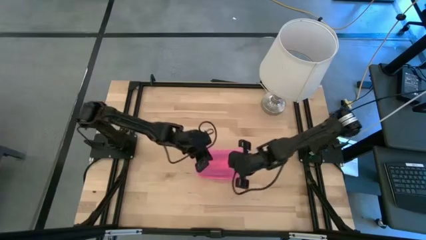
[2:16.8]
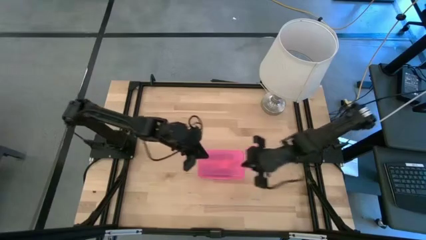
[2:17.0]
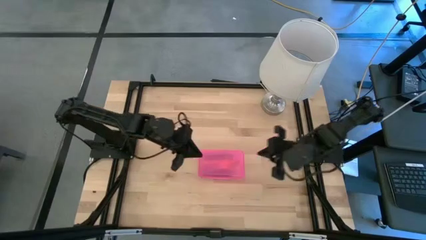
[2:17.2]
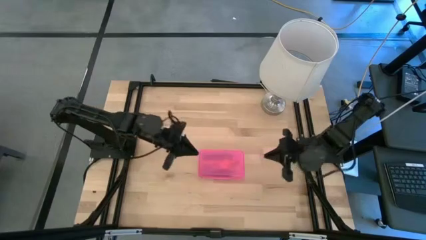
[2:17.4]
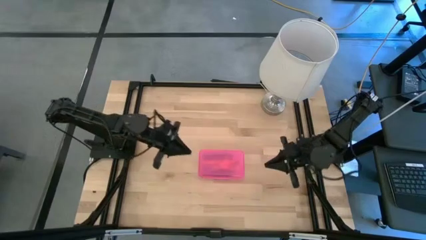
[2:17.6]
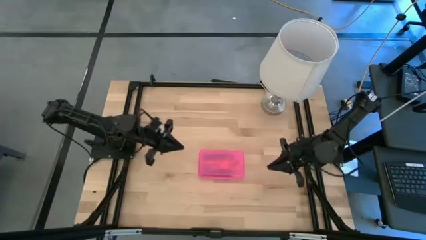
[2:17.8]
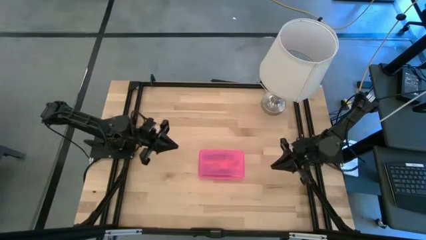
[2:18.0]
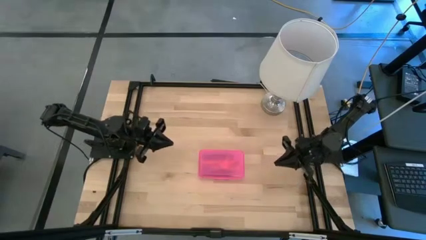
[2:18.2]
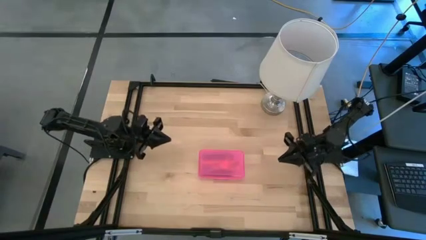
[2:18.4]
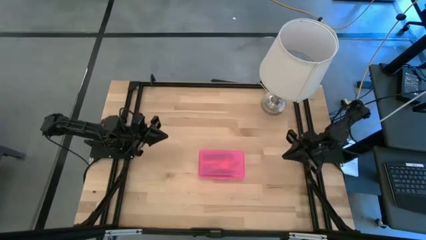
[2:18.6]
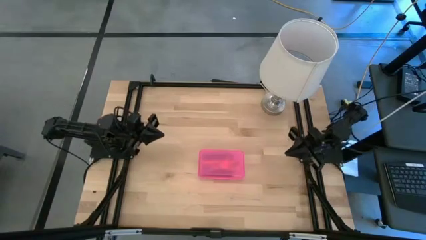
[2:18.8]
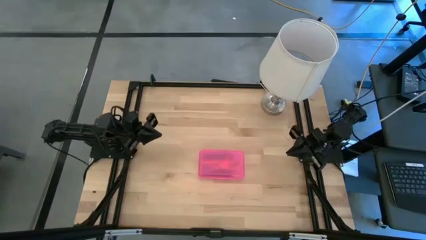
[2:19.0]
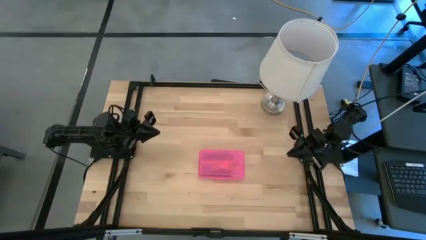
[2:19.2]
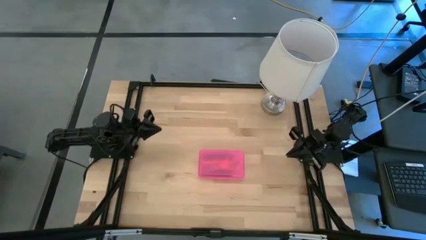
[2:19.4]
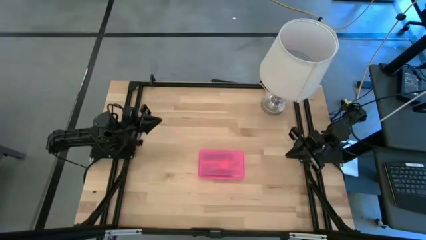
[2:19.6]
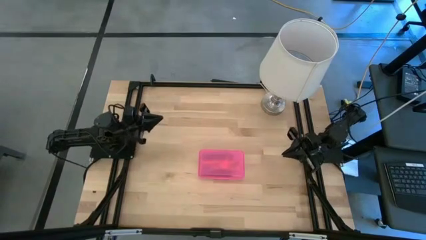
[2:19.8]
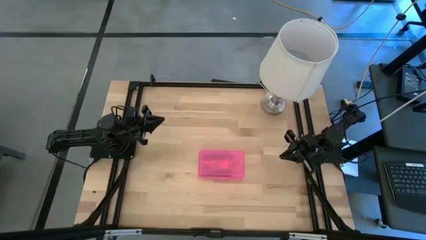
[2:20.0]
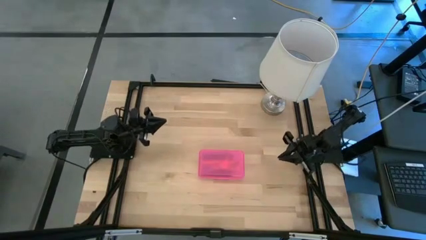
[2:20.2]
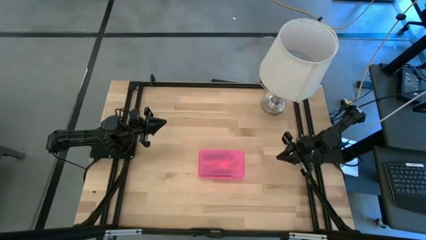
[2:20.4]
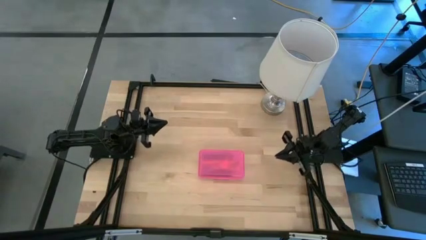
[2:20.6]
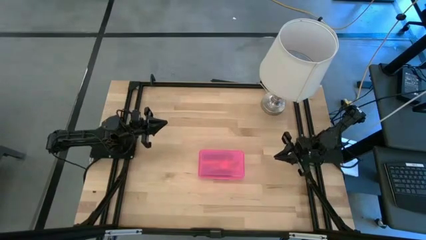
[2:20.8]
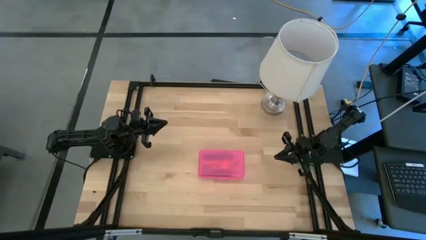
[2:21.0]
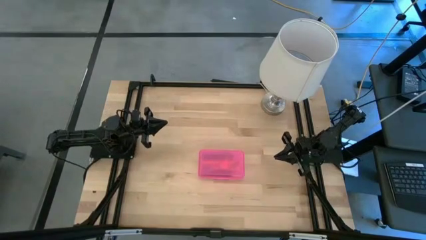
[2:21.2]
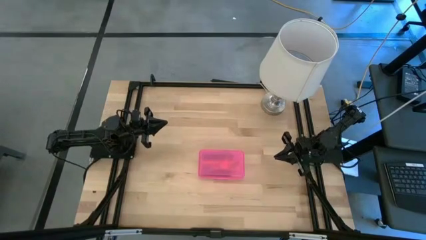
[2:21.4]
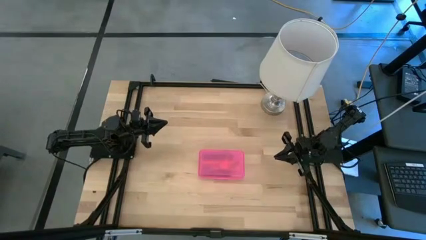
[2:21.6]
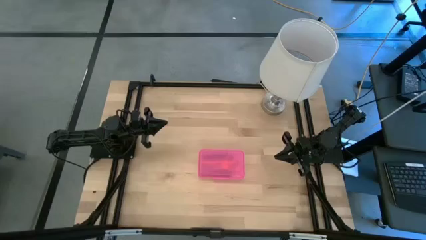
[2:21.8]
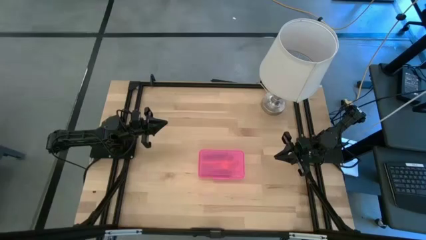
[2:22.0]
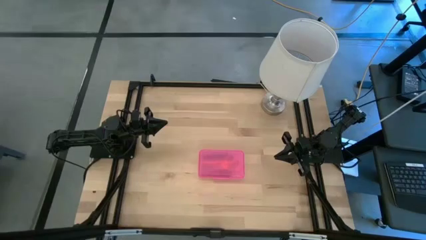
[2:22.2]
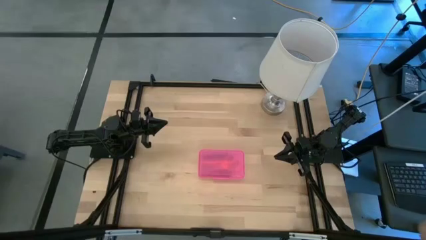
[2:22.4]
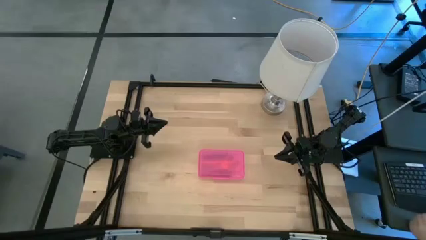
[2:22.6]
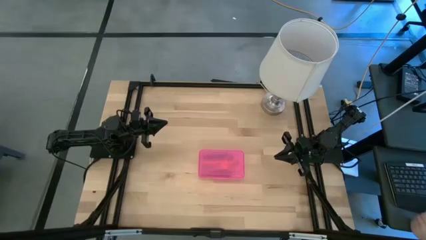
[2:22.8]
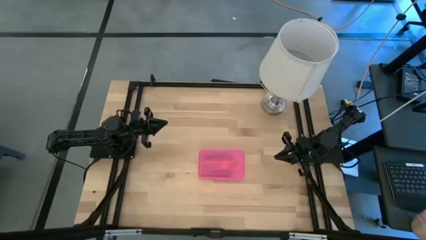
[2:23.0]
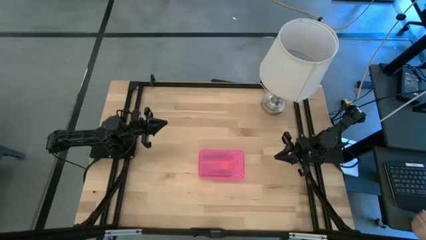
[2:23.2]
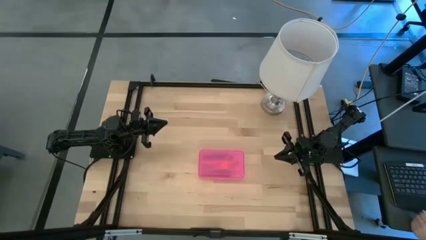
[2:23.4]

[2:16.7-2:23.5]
Task: Pick & place school supplies into a supply box
Return to Home Position

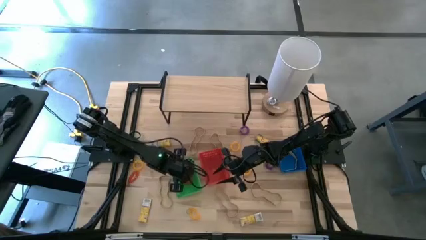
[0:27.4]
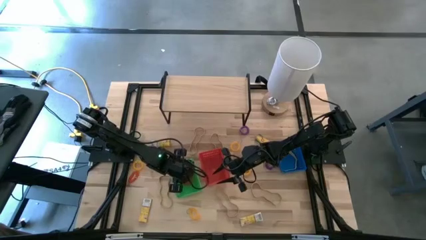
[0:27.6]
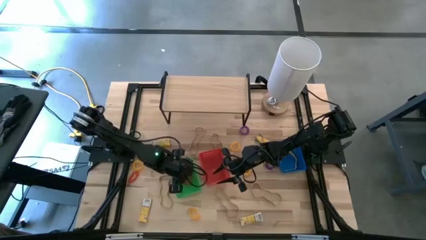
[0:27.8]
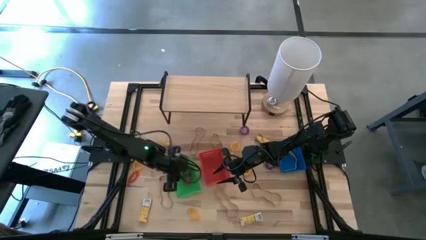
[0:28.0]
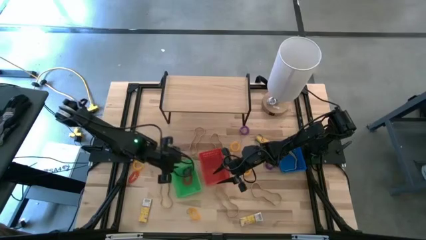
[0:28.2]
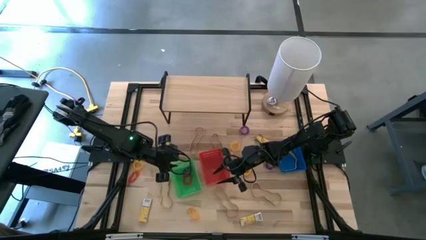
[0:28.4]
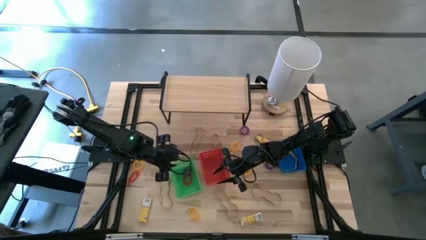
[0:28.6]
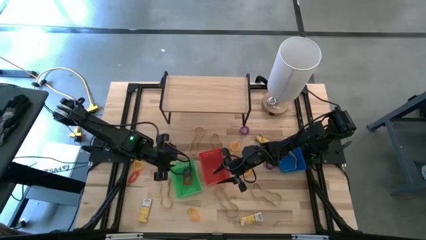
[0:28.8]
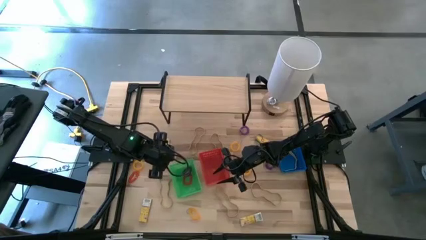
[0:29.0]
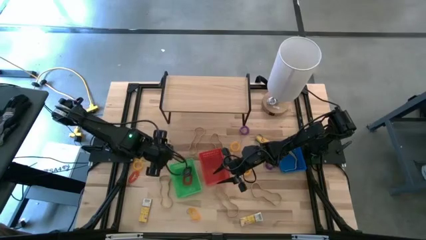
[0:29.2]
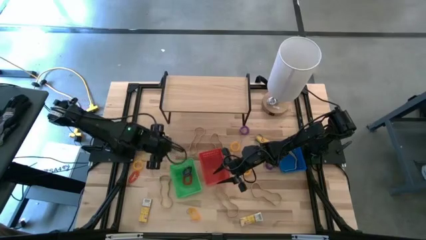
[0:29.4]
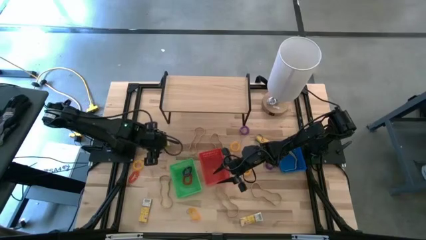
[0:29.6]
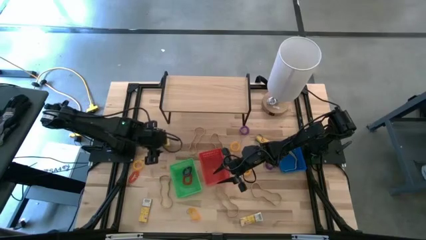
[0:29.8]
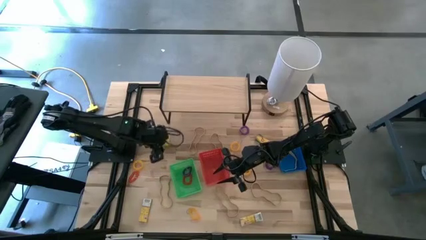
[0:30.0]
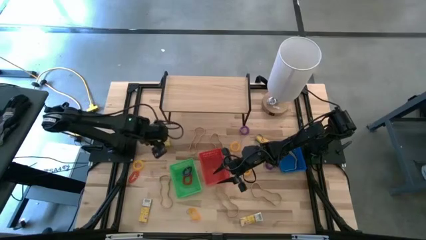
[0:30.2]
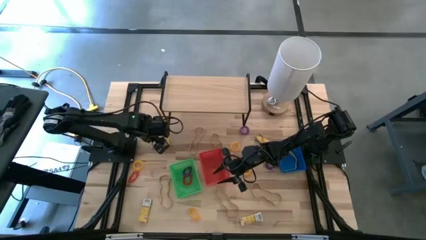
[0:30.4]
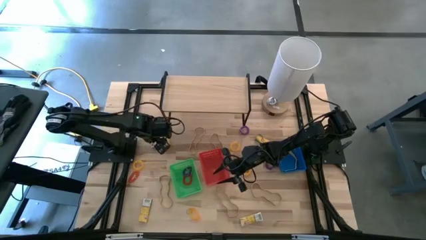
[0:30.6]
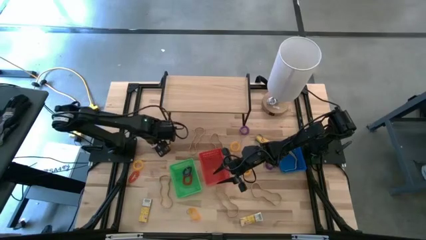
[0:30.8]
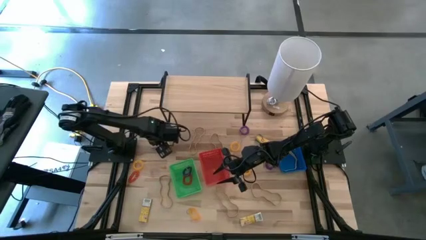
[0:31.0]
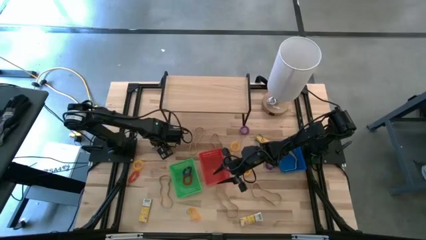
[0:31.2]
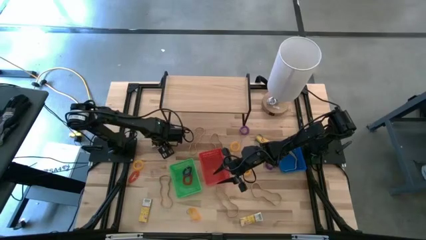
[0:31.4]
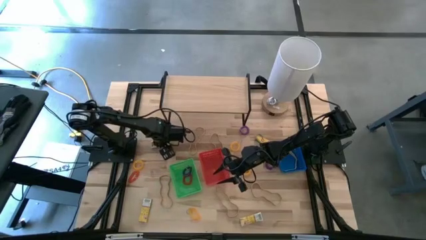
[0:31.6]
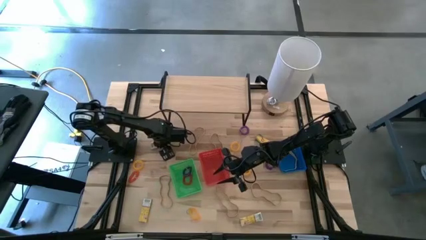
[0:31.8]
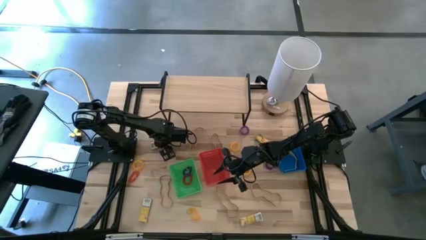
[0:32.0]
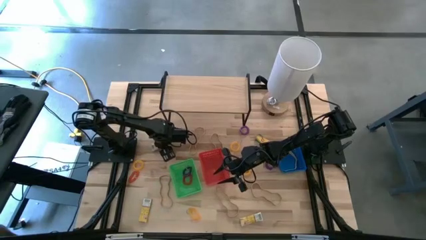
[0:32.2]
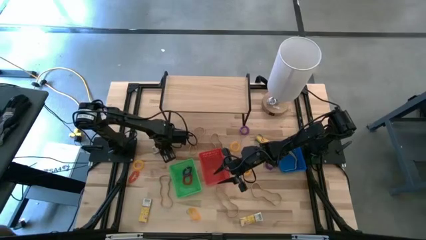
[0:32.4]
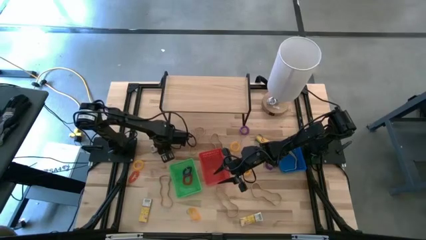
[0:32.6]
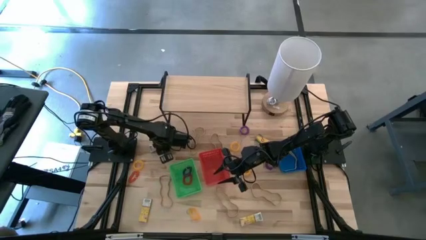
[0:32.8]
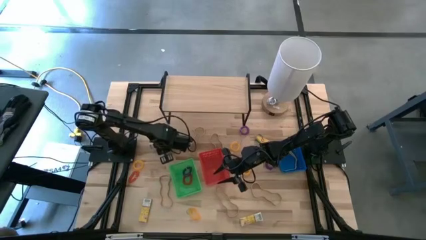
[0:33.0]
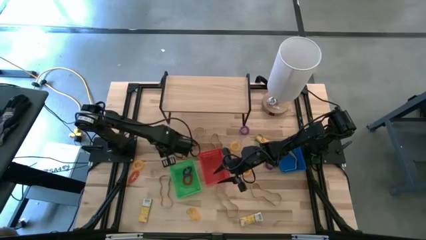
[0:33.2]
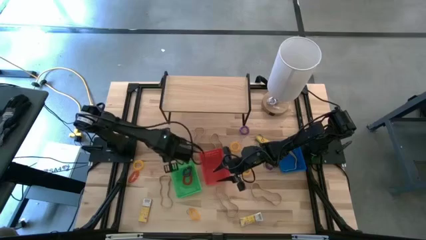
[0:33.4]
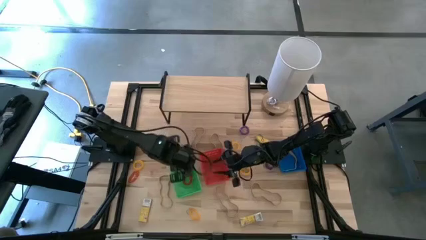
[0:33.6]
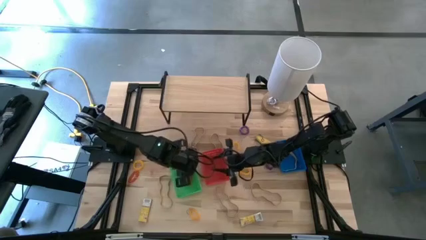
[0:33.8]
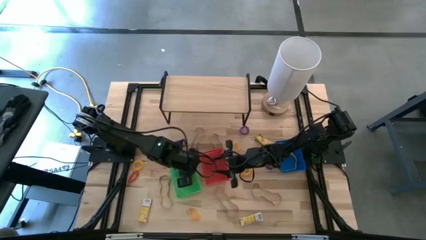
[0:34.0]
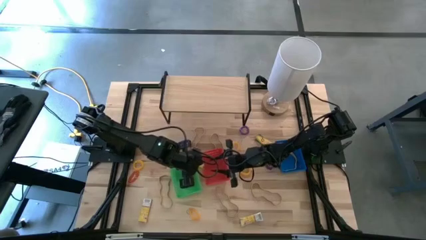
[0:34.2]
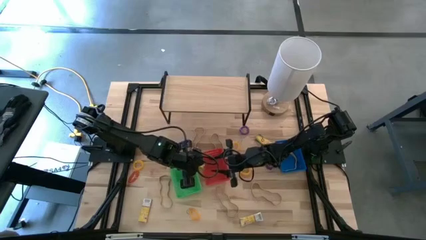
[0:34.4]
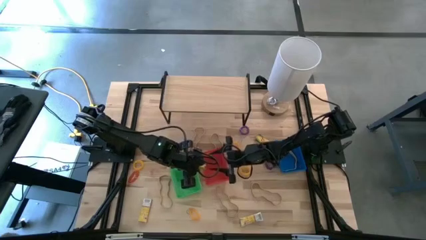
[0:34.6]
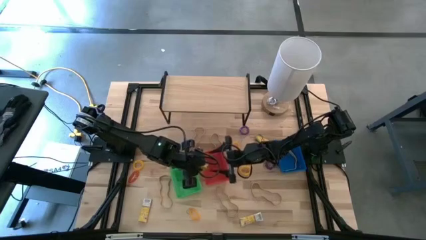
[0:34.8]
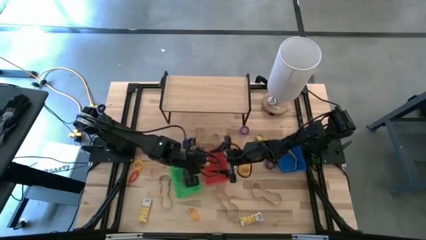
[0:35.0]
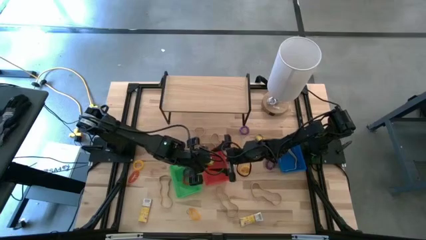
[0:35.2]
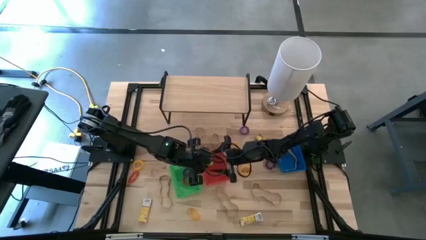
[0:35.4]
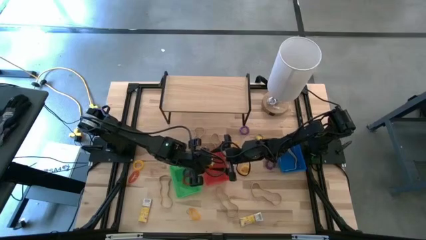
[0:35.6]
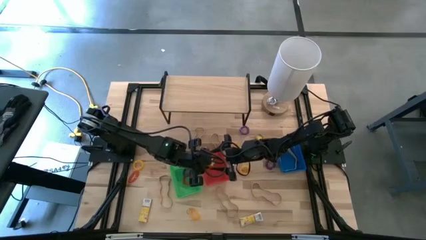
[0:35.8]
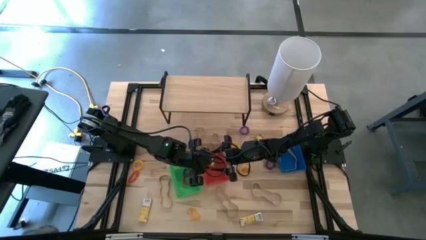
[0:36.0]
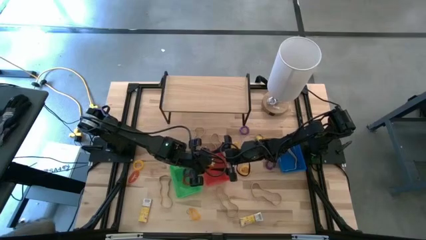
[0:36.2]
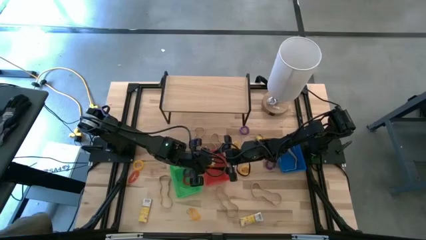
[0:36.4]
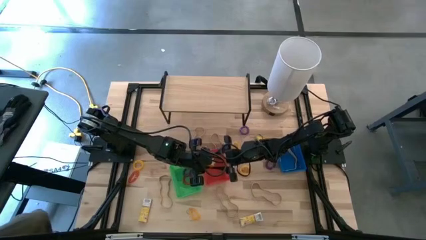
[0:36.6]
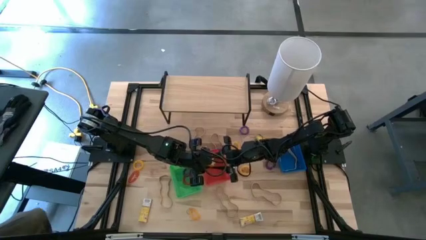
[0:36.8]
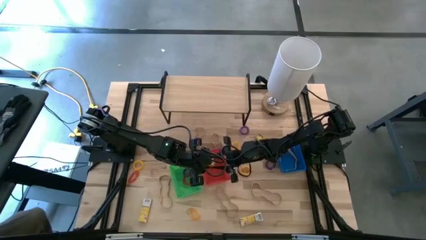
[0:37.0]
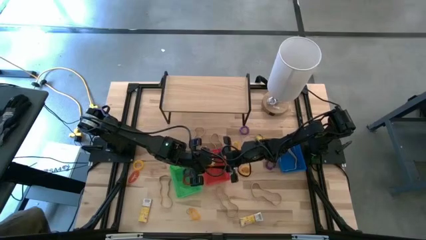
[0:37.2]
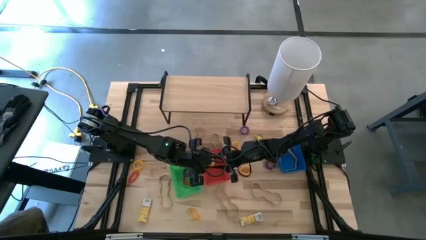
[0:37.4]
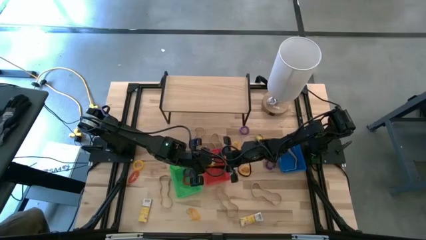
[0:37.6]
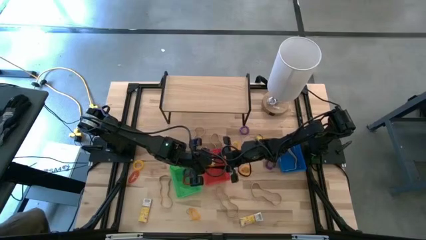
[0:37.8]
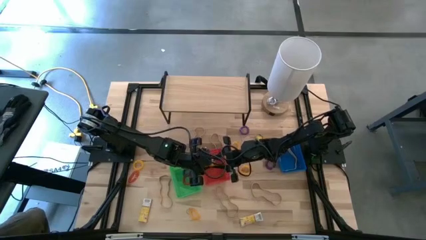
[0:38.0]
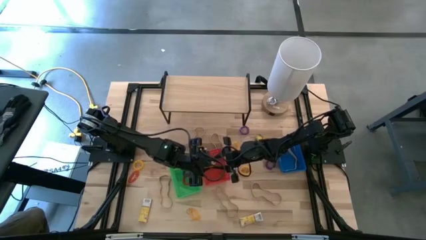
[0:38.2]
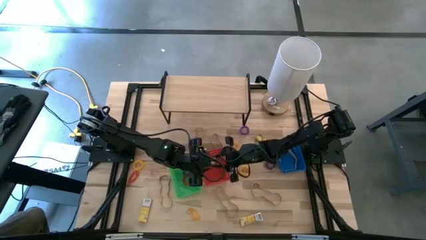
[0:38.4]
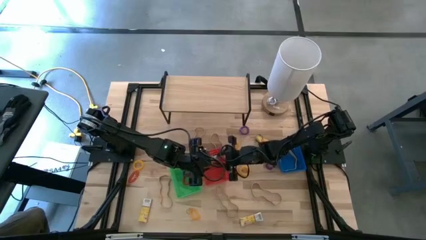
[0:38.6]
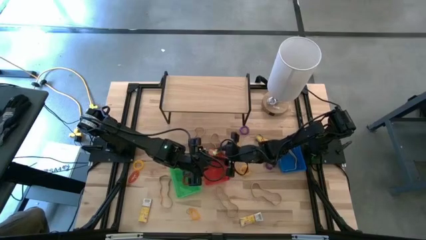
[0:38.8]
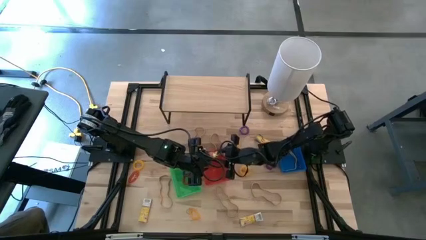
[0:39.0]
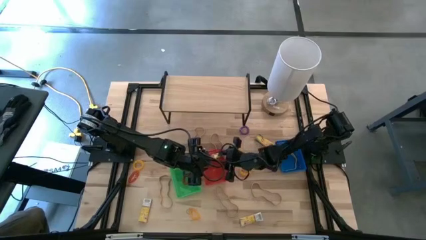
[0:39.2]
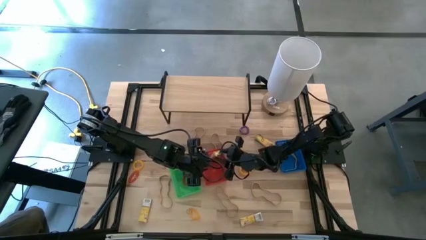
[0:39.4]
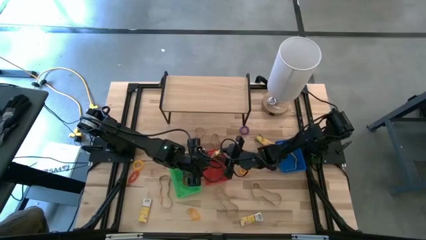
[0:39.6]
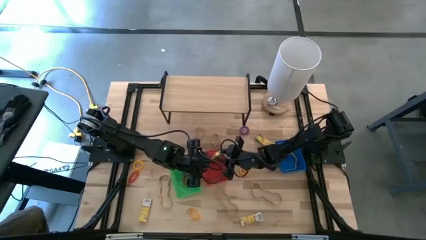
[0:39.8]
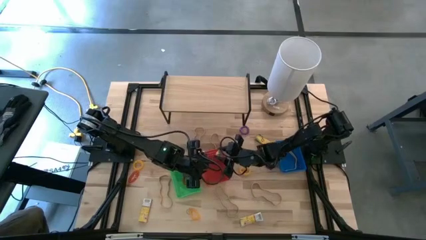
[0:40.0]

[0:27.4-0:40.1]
Task: Pick & Place Office Desk Supplies
Put the yellow crayon box into the red bin
